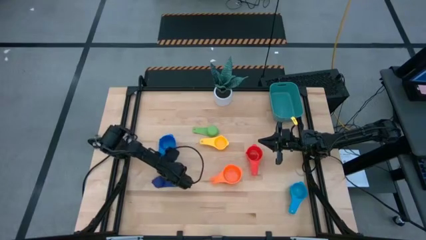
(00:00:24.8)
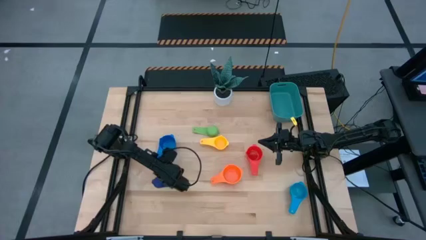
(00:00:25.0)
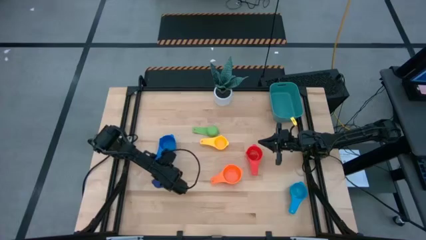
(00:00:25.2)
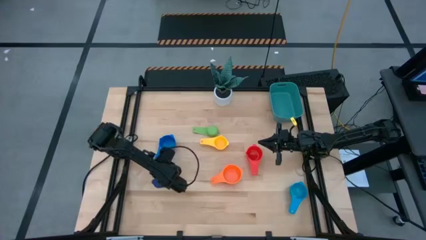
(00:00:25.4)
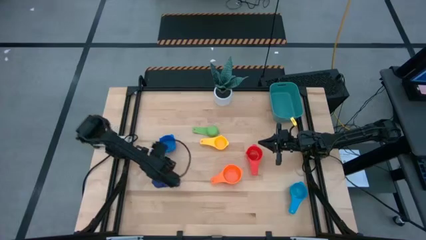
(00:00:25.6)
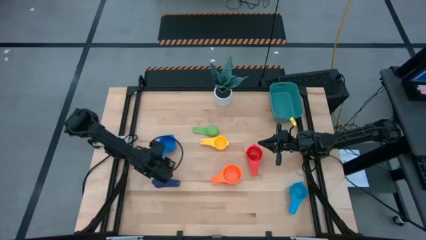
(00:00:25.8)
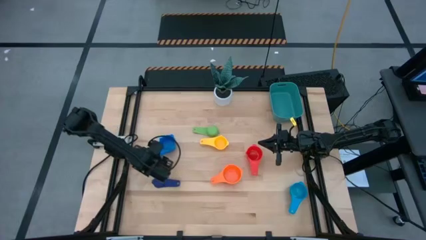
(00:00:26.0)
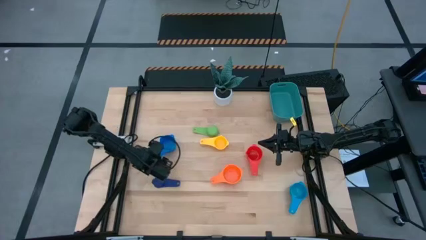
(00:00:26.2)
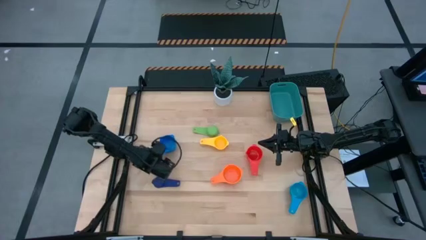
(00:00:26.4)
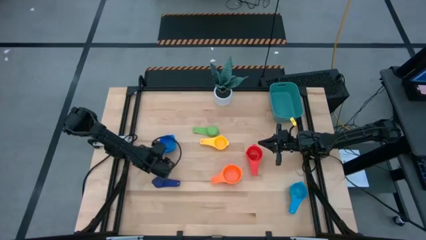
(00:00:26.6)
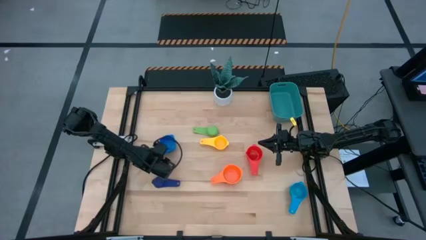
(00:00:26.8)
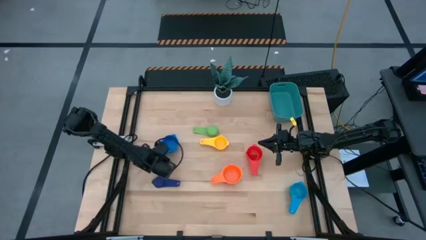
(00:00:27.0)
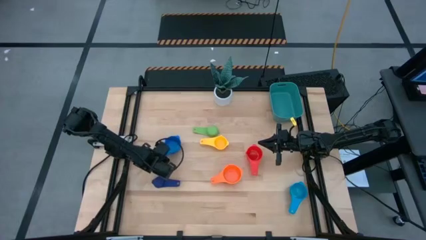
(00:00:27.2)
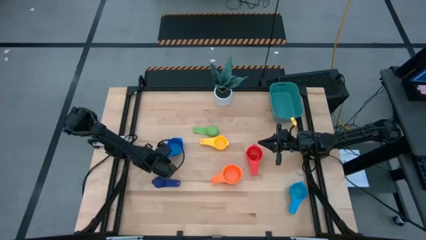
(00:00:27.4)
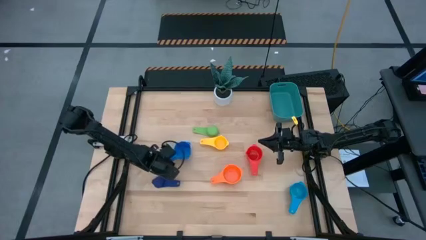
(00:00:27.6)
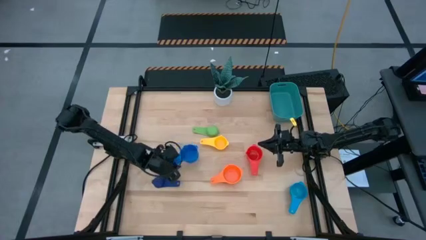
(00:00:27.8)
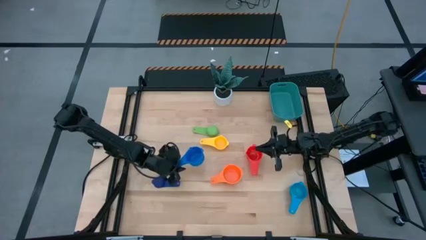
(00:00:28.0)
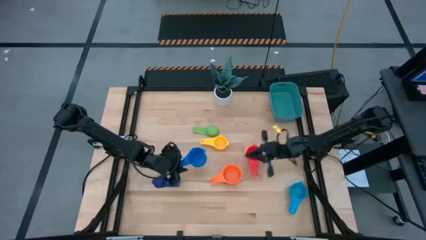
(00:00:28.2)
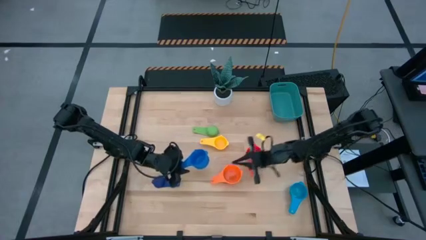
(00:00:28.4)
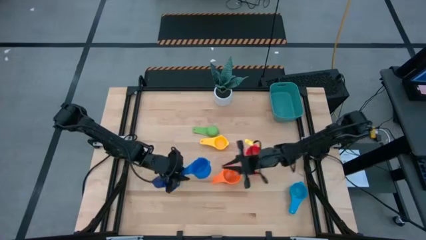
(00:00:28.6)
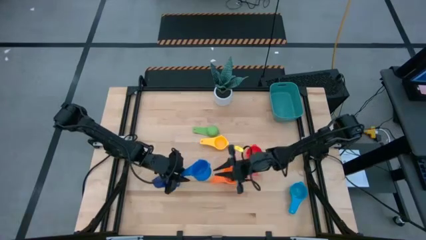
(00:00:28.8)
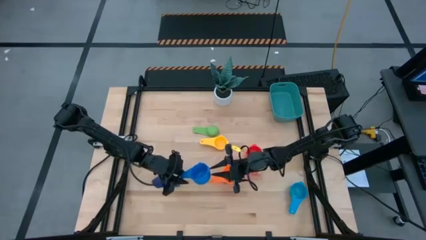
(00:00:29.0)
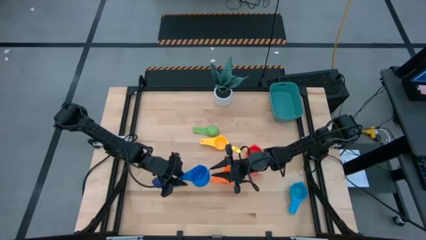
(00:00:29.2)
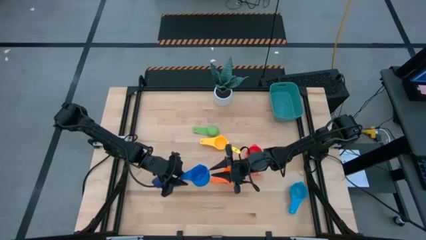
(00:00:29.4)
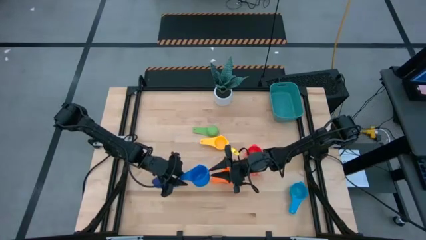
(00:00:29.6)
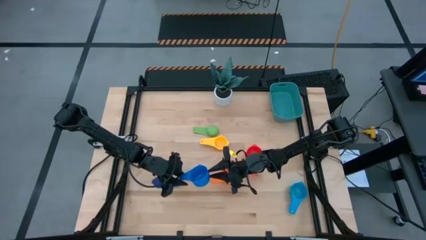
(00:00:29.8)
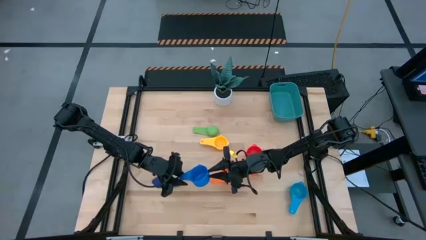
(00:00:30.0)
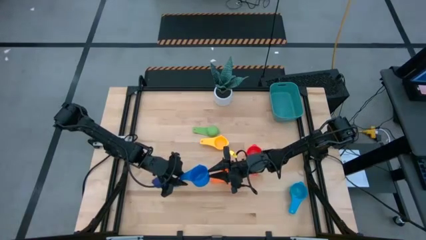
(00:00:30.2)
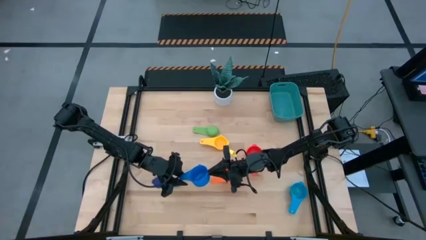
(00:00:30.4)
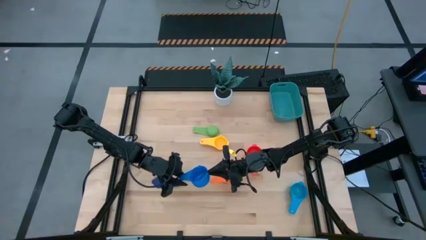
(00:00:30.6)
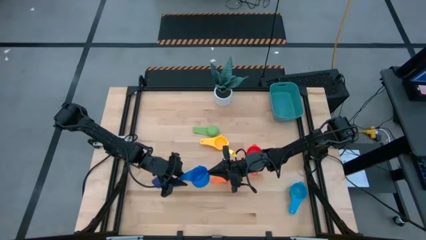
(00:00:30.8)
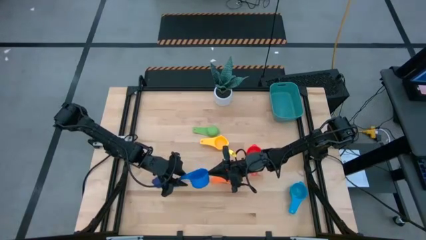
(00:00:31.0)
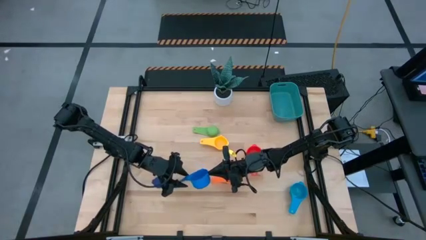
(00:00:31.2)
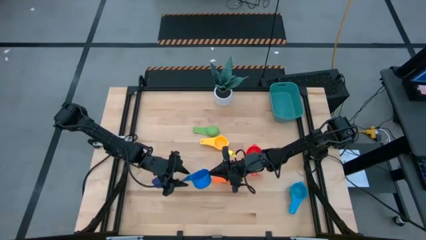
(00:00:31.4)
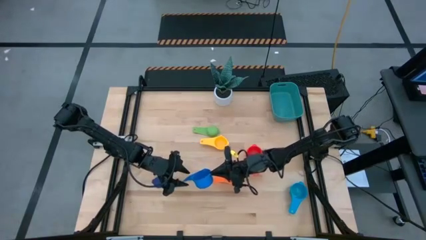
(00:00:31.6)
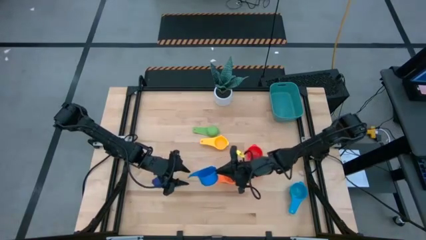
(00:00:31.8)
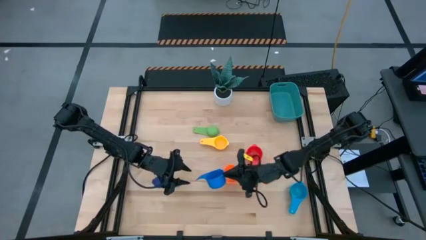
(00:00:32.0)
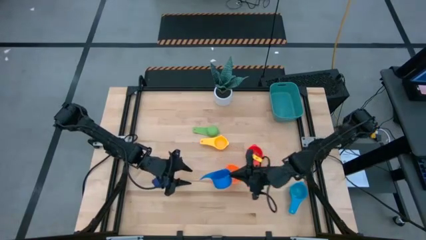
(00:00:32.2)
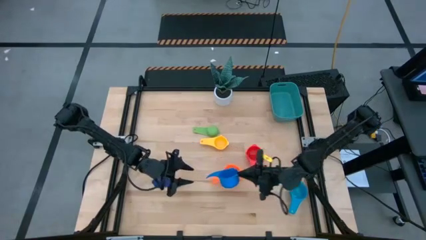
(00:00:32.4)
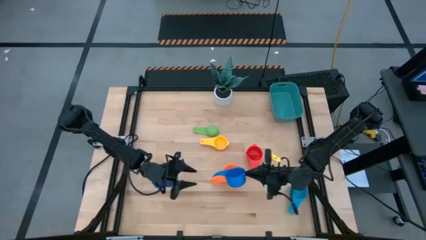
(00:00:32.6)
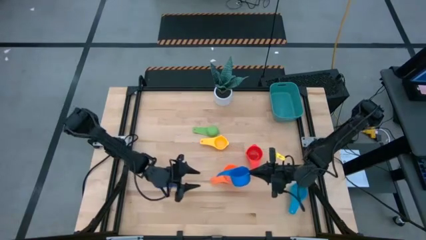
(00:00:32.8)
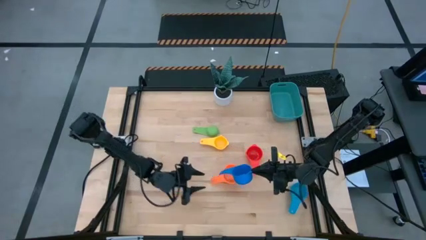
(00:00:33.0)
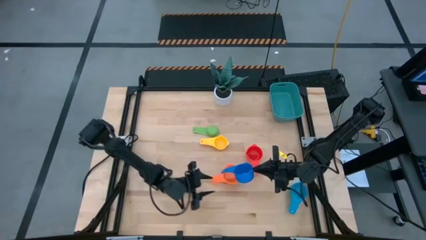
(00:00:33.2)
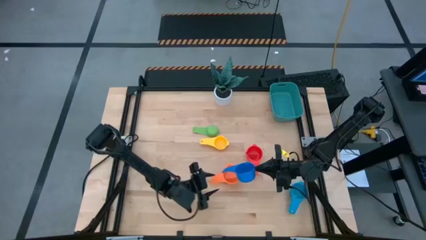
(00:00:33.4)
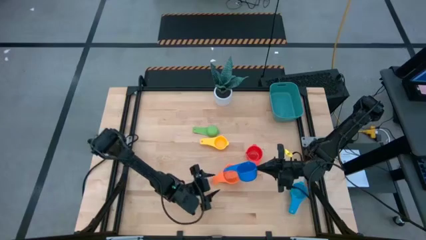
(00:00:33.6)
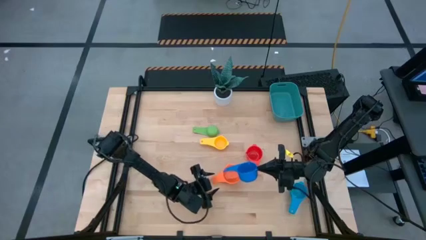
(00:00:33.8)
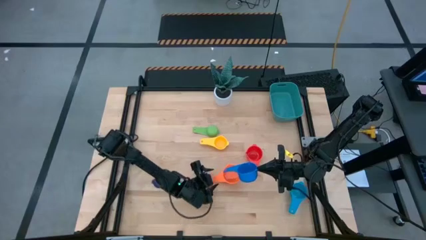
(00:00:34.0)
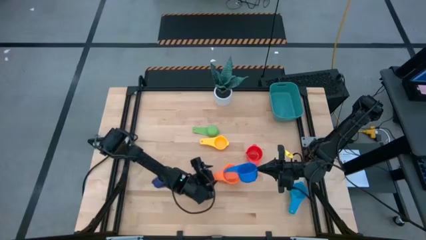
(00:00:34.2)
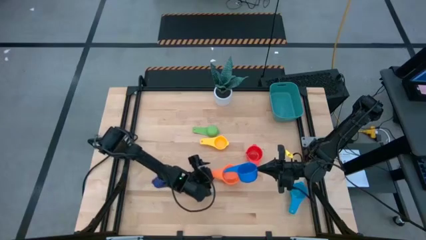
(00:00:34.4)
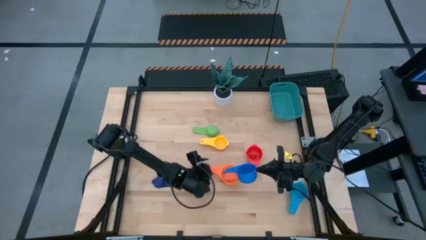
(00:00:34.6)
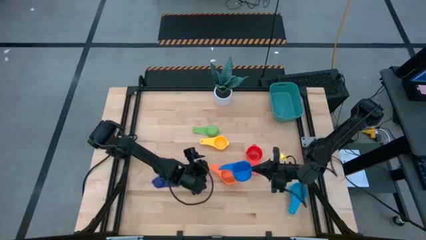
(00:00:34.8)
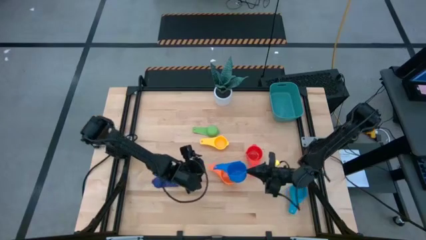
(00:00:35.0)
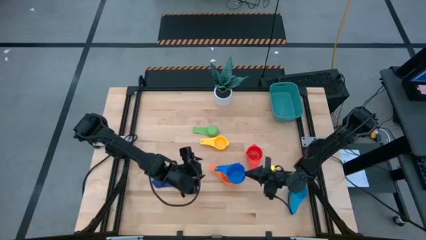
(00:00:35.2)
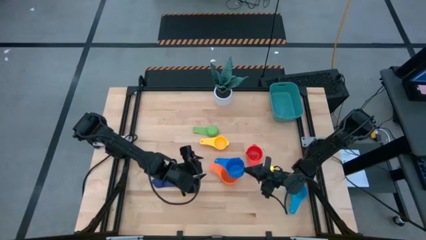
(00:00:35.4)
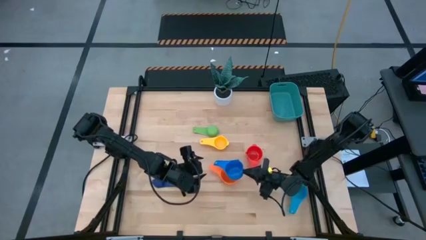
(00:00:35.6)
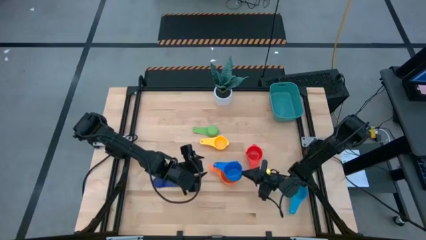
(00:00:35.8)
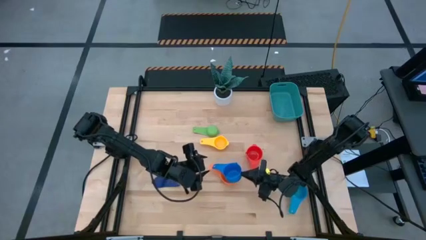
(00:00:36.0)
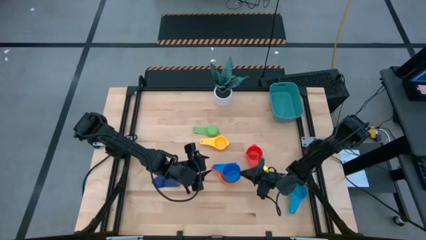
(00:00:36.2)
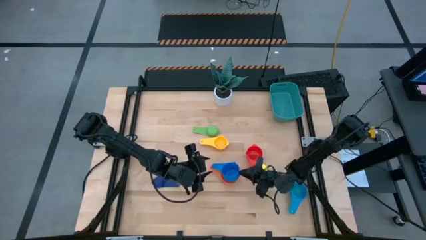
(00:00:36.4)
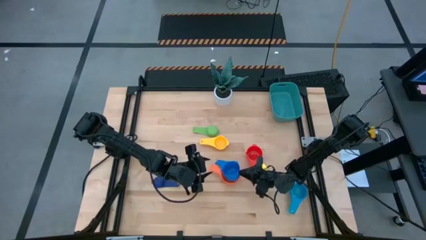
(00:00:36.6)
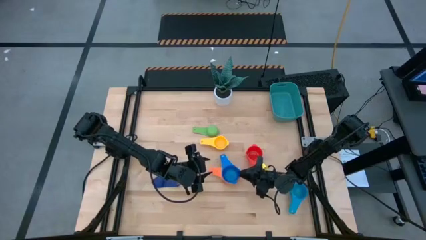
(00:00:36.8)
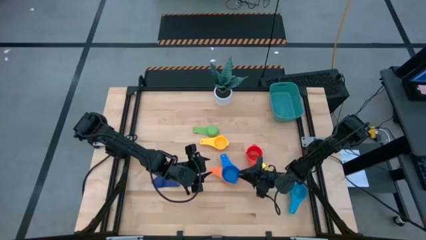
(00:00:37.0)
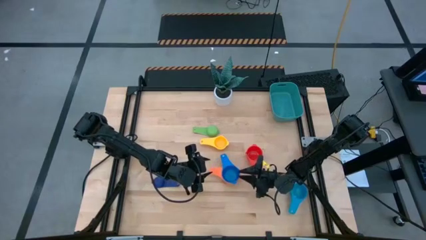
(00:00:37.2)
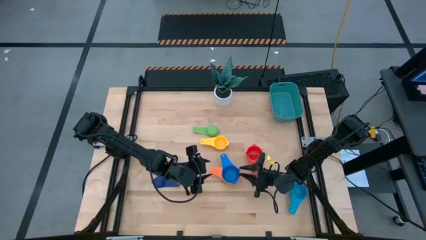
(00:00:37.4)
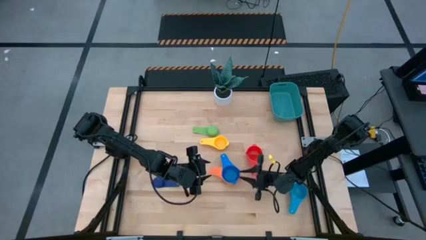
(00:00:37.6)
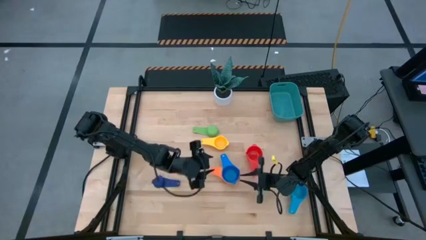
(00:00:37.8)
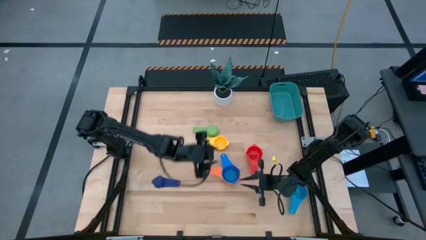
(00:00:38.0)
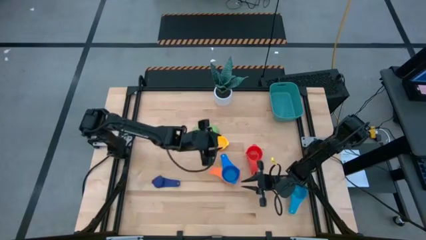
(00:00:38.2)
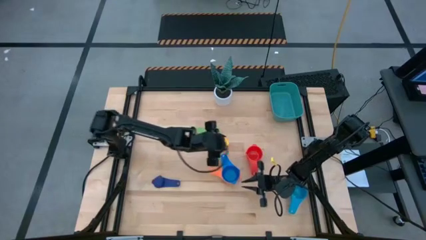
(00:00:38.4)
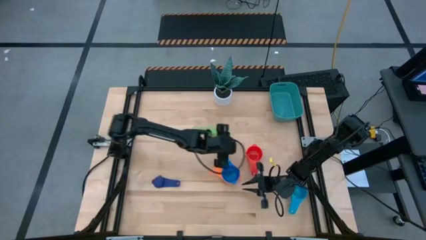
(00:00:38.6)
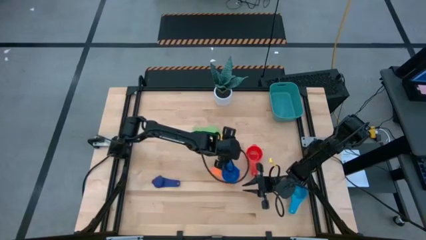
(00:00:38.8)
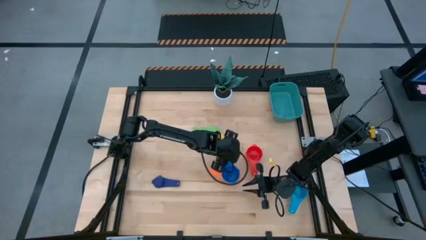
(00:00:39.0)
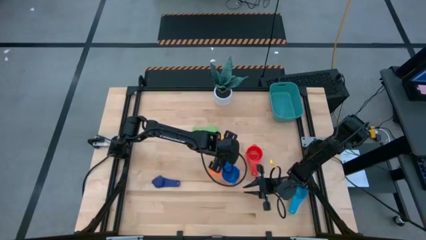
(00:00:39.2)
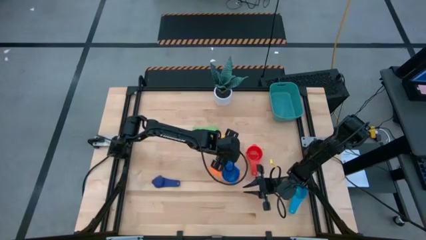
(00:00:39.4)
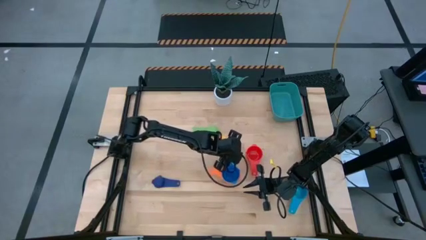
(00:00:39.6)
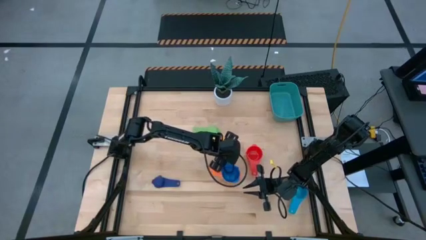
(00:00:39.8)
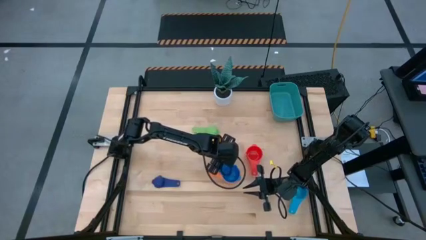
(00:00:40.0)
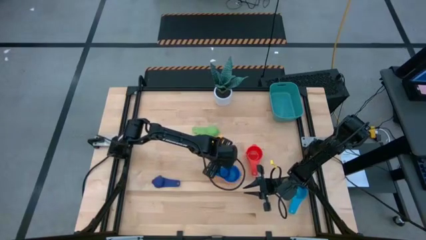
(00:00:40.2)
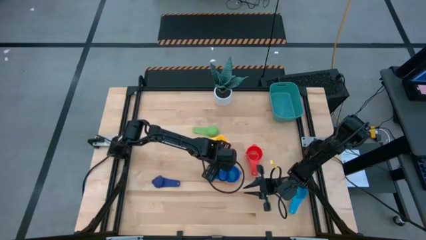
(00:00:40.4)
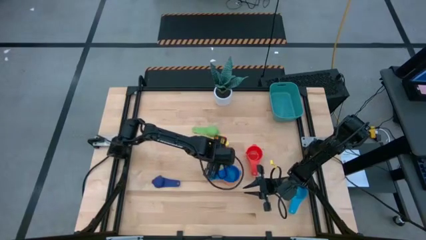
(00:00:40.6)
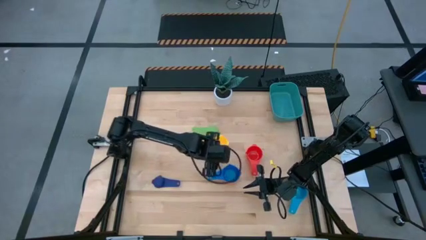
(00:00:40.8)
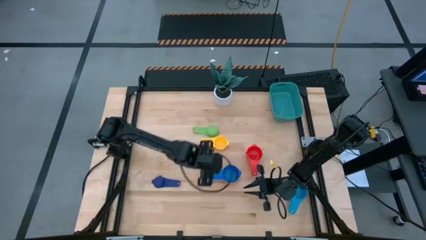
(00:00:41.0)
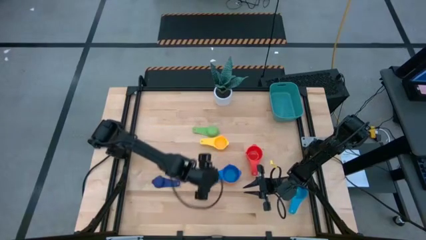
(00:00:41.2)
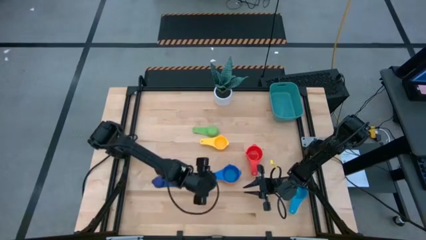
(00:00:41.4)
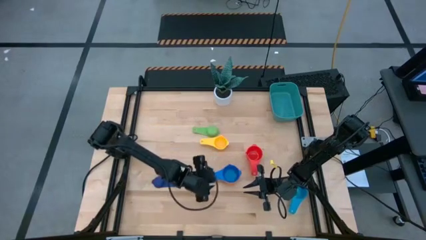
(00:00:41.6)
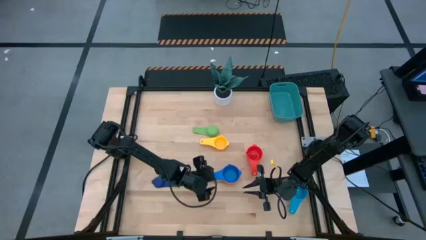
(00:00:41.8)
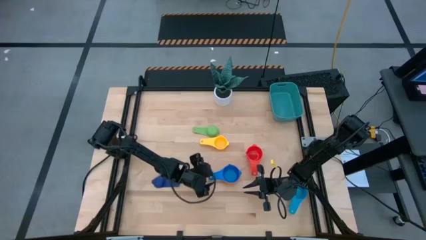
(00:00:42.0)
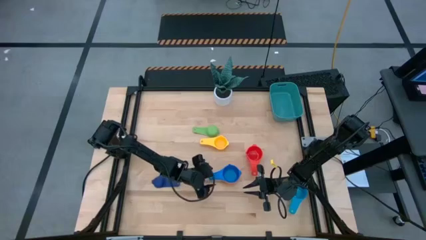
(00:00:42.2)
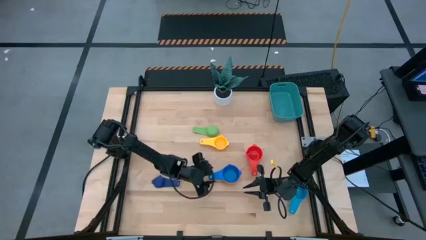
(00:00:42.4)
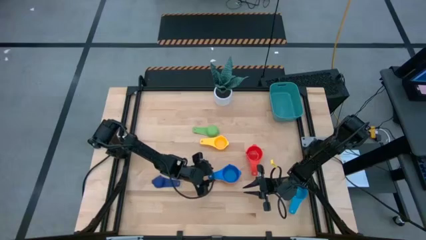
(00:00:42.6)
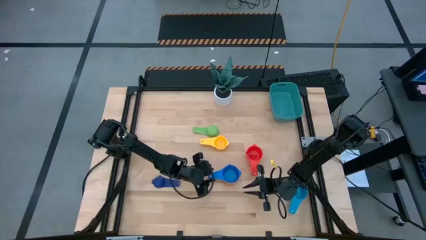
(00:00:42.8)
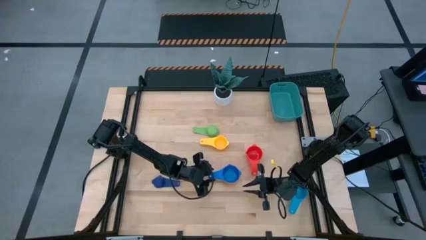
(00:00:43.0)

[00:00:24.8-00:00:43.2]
Task: Nest measuring cups in basket
Stack the blue measuring cup on top of the orange measuring cup
